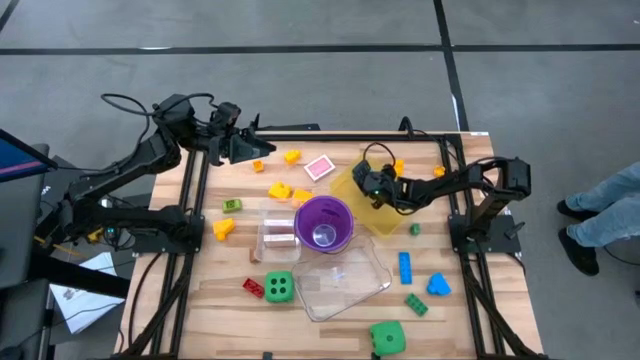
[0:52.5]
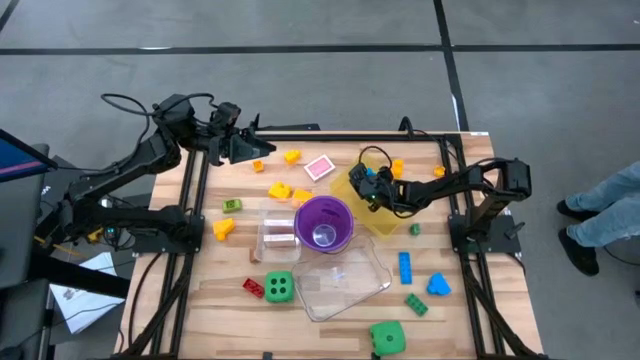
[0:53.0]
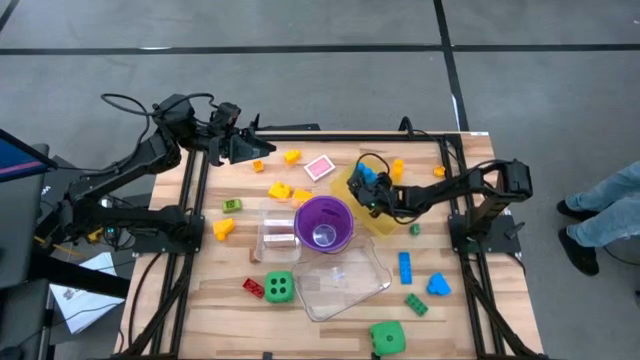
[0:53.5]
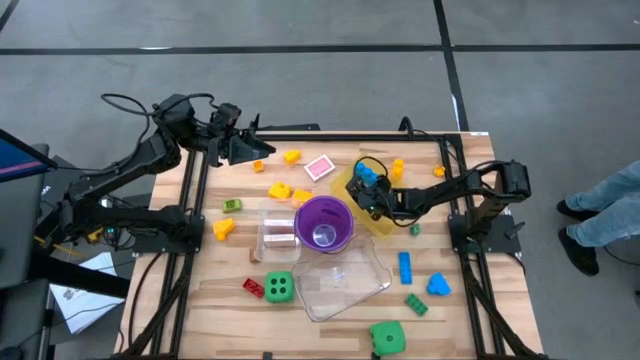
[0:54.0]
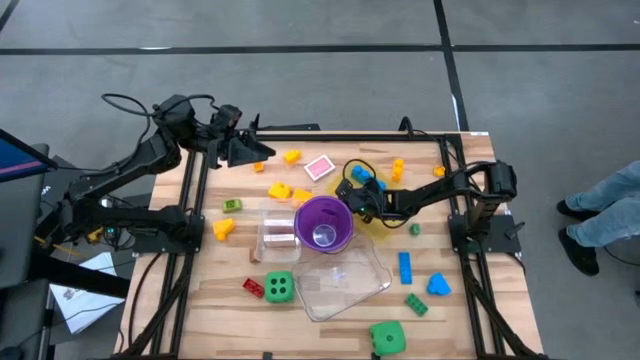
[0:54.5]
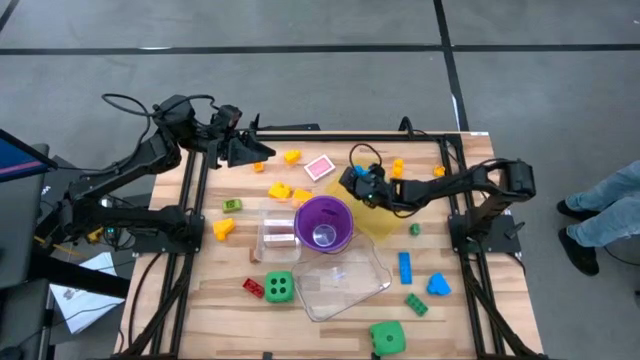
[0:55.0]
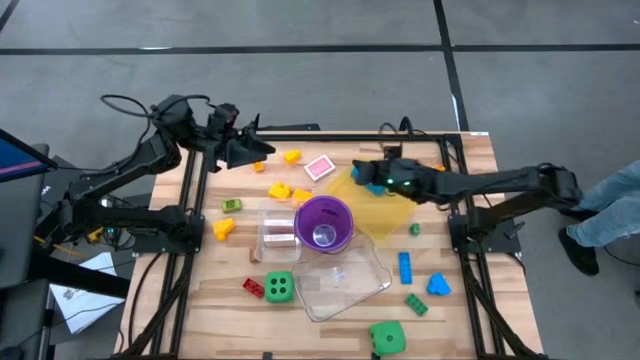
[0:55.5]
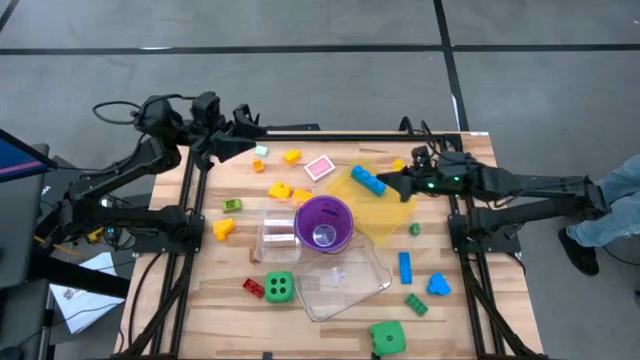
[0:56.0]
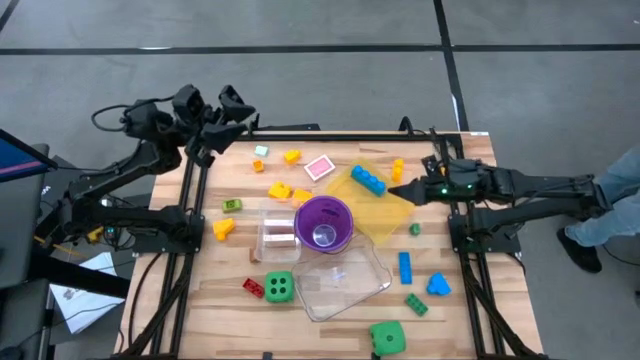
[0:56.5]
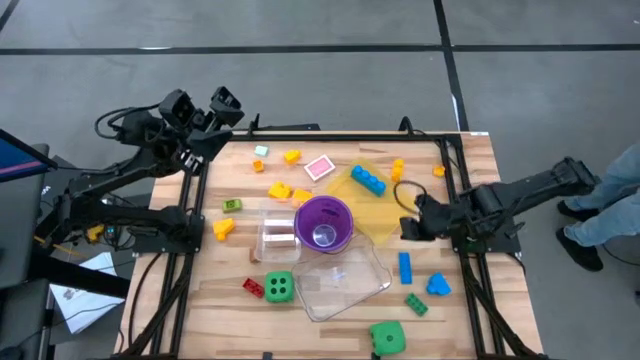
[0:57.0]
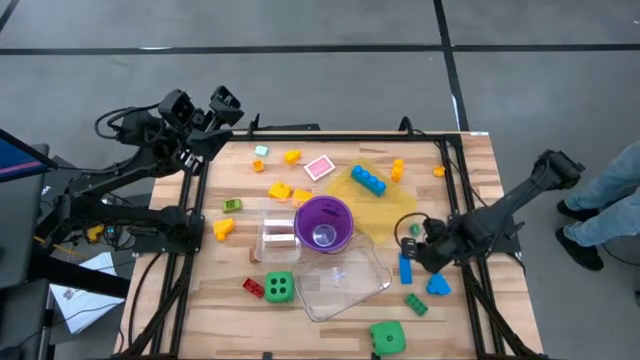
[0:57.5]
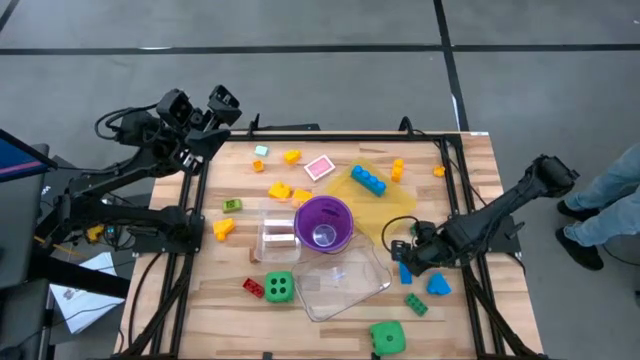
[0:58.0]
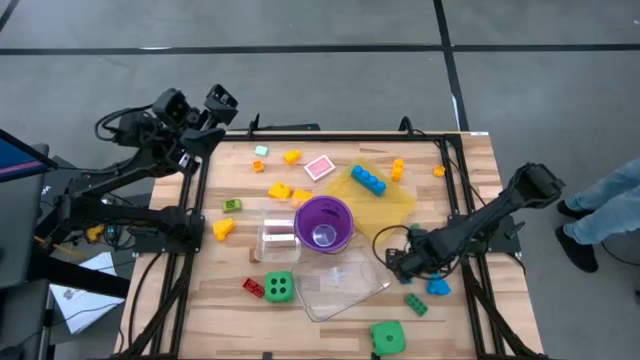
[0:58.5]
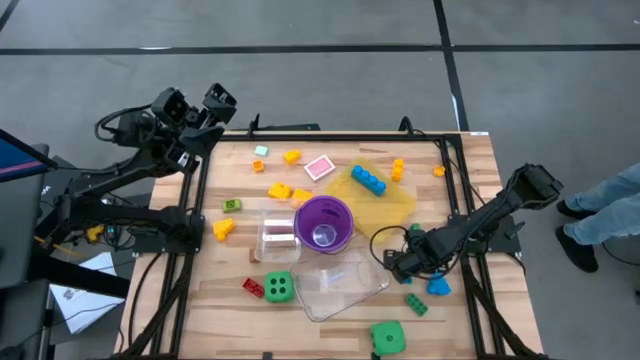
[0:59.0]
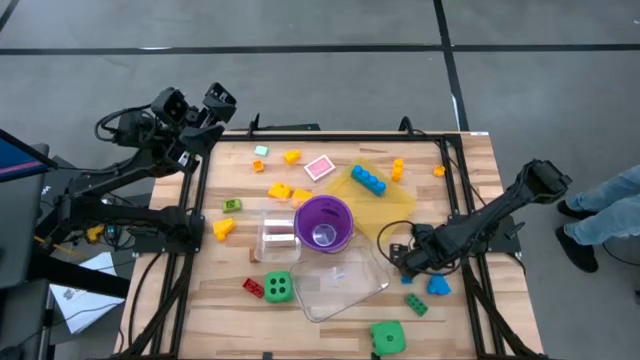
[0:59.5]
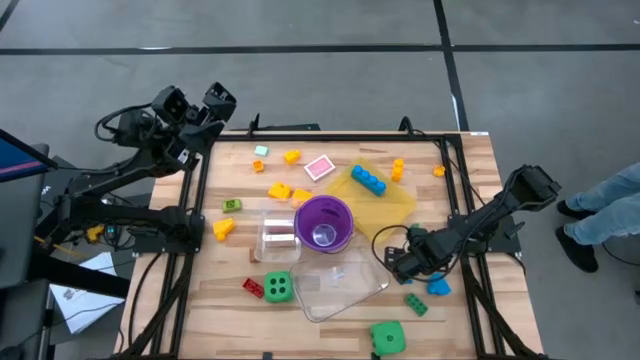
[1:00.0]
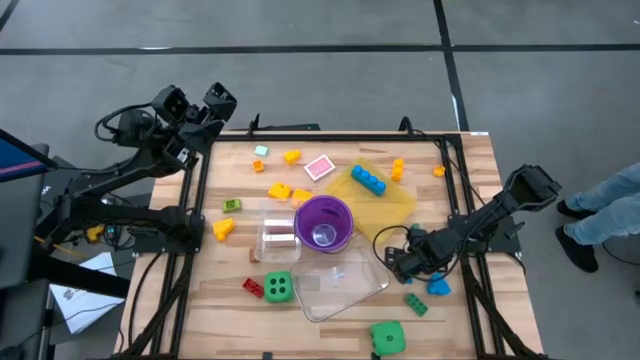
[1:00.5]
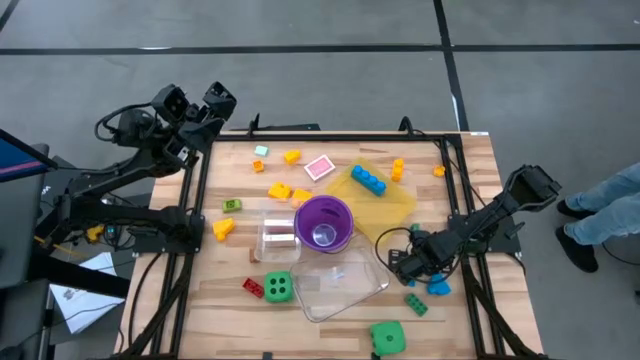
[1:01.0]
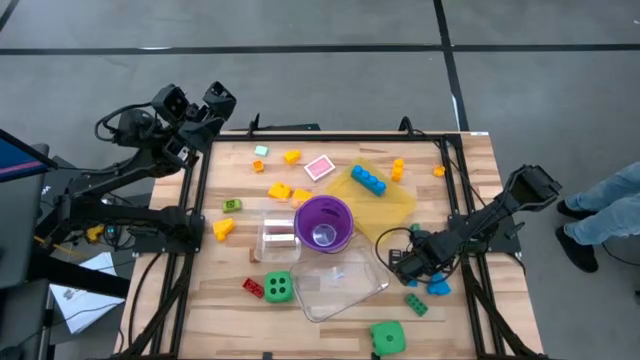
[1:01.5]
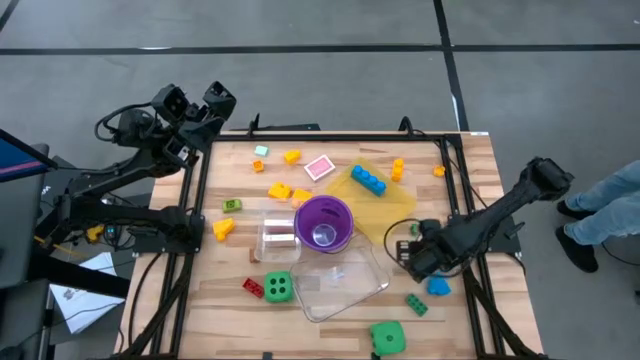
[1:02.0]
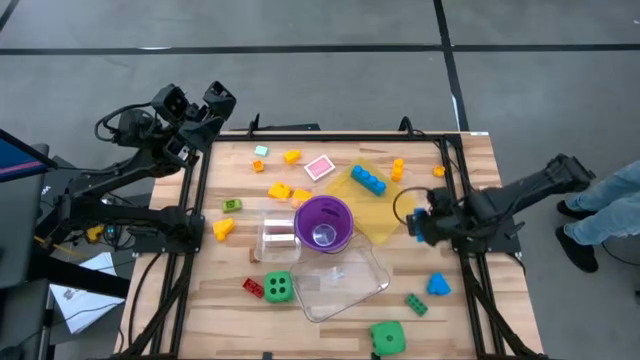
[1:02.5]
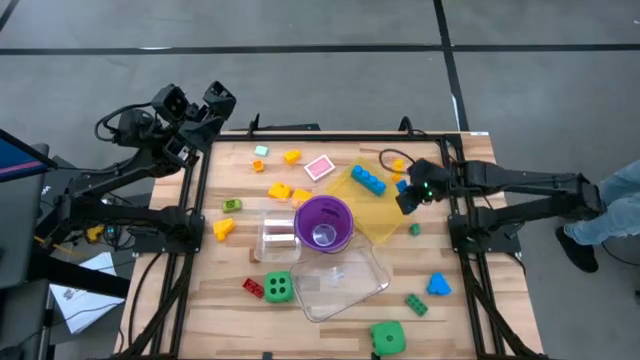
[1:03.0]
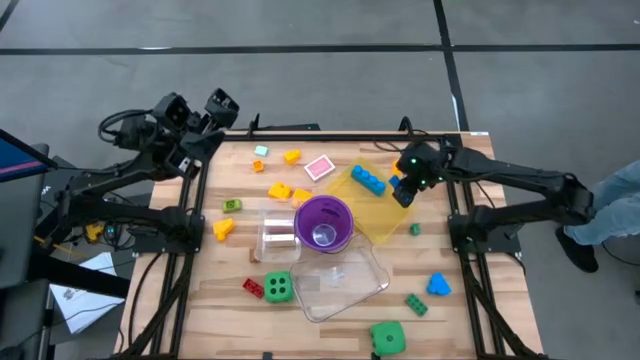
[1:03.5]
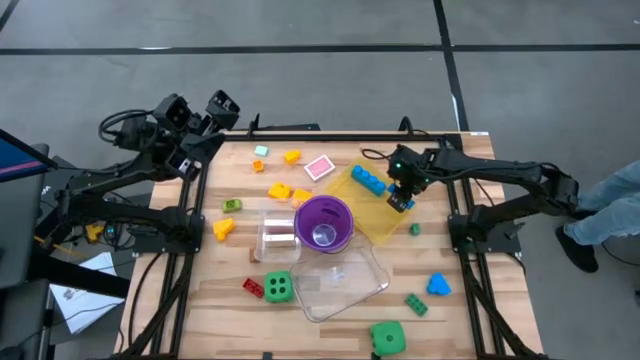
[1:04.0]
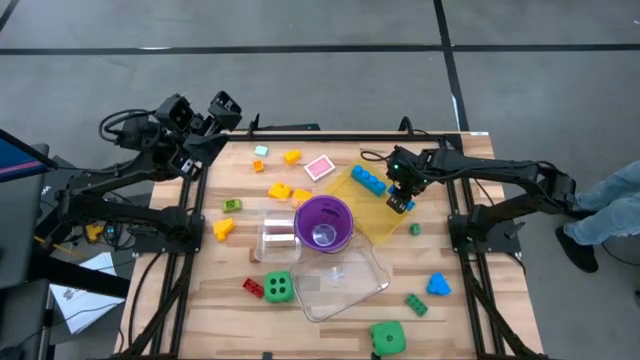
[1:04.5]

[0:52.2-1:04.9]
Task: Pick & Place Toys
Put the small blue game piece into the yellow bin

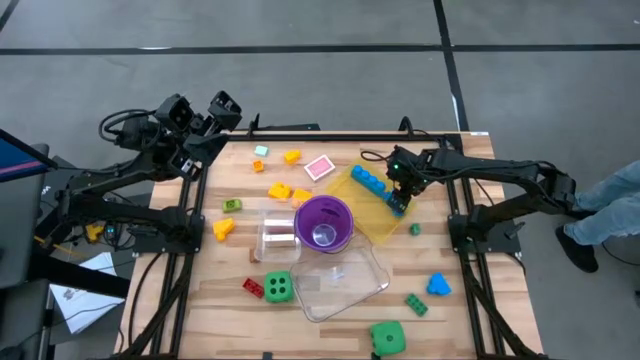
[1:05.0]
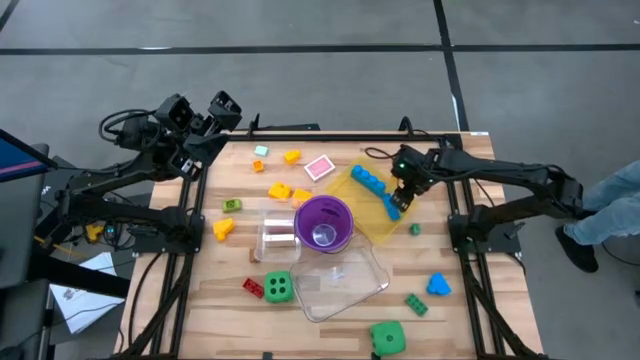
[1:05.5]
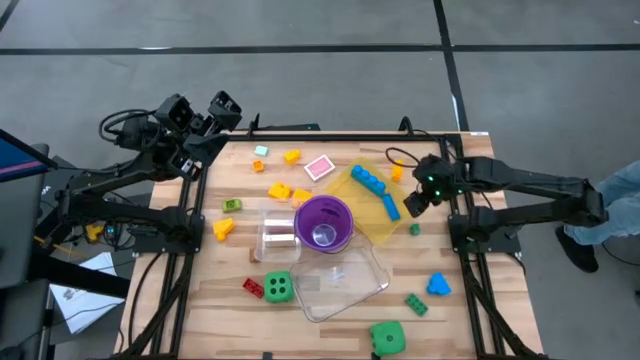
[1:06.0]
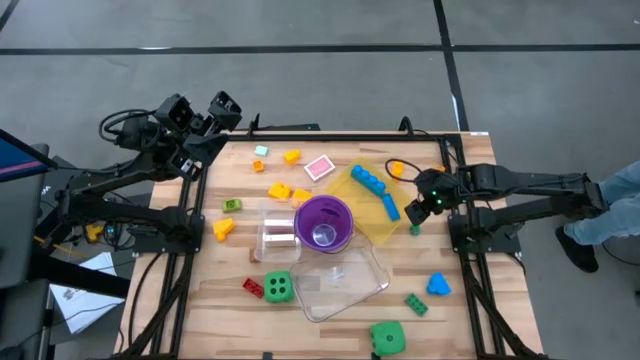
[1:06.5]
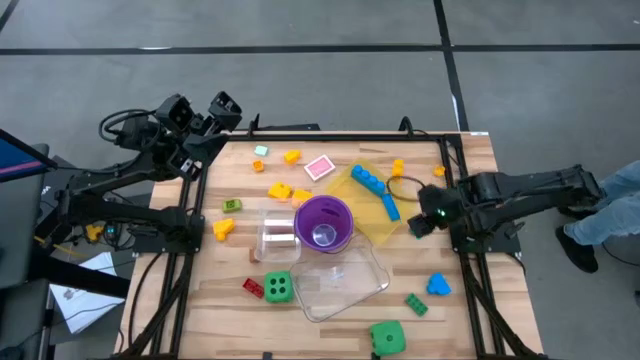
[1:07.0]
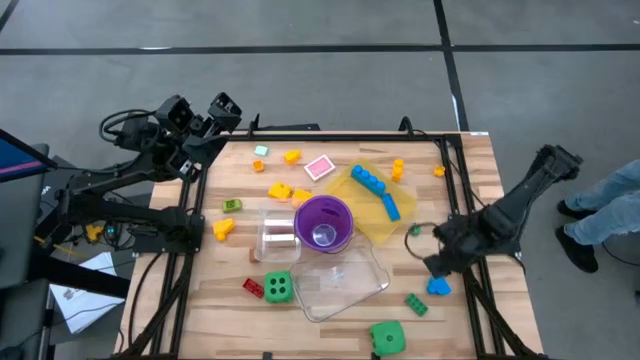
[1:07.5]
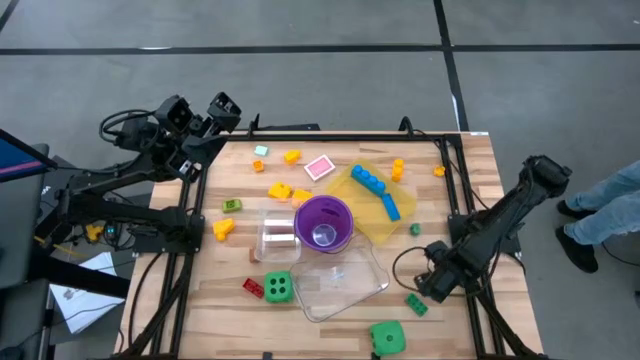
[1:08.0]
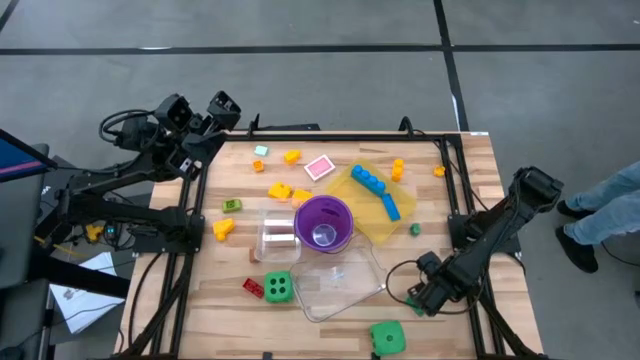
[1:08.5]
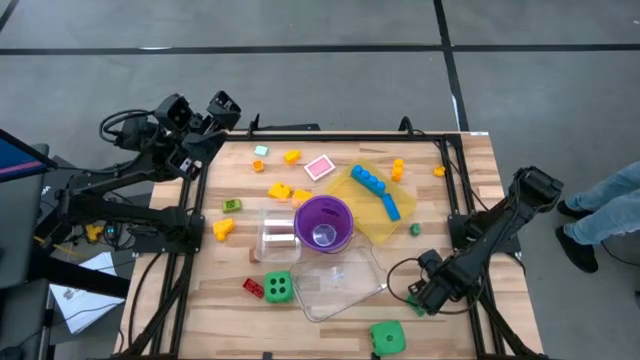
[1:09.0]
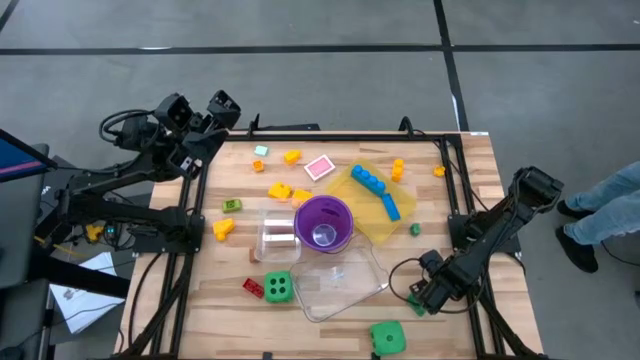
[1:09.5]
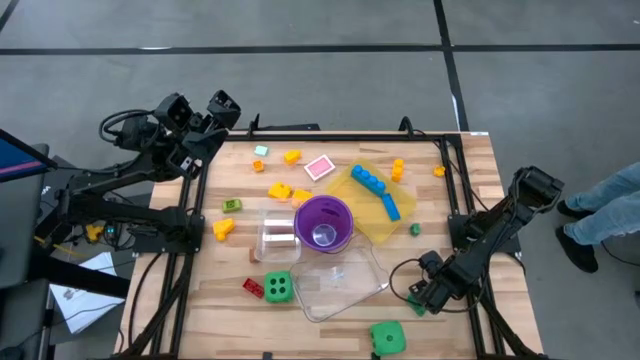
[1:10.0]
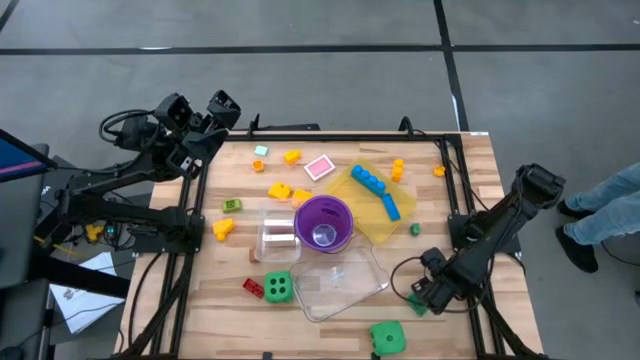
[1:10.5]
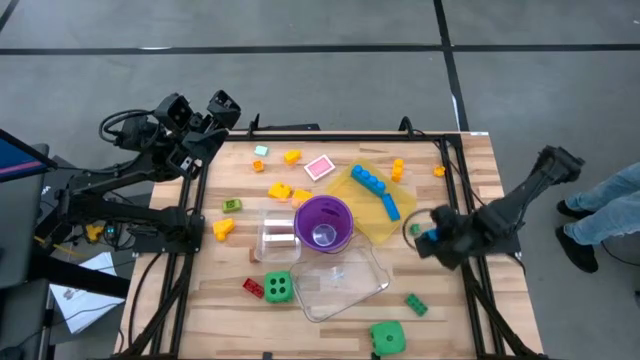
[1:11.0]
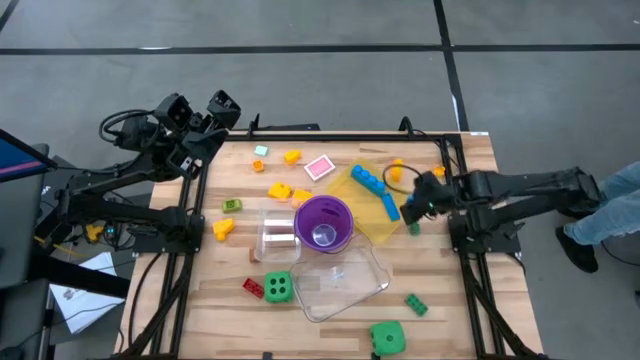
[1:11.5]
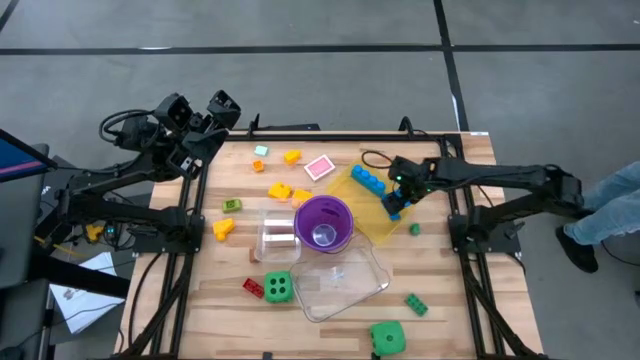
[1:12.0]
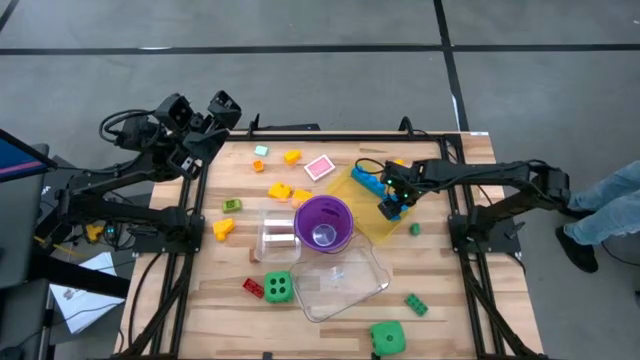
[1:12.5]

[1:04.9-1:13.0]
Put the large blue game piece into the yellow bin
